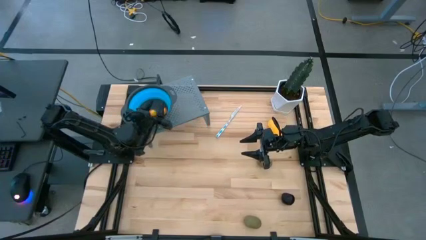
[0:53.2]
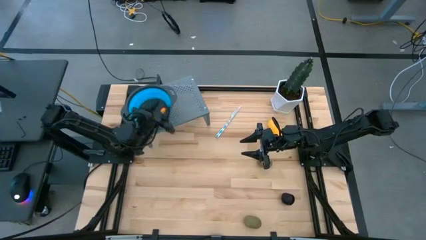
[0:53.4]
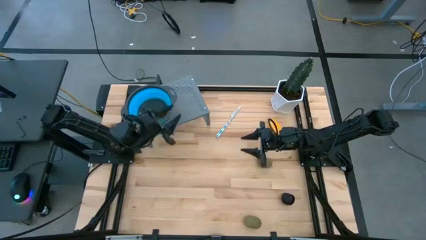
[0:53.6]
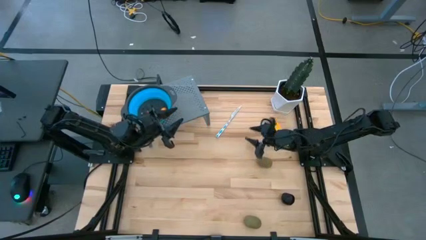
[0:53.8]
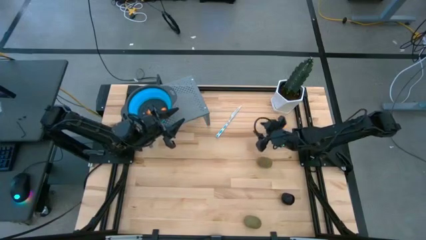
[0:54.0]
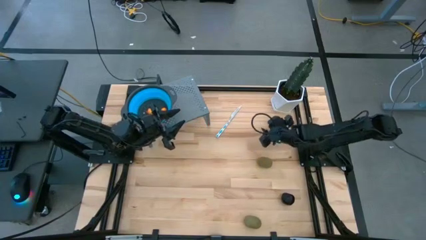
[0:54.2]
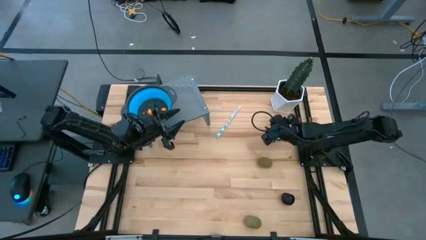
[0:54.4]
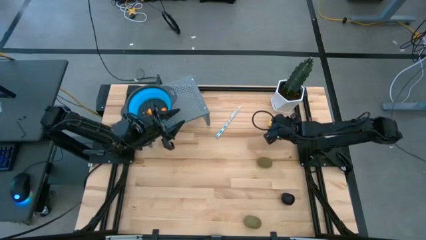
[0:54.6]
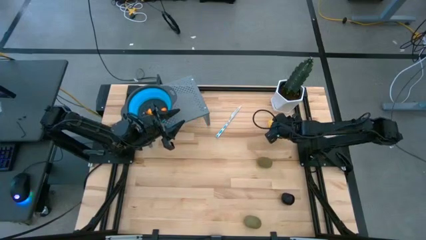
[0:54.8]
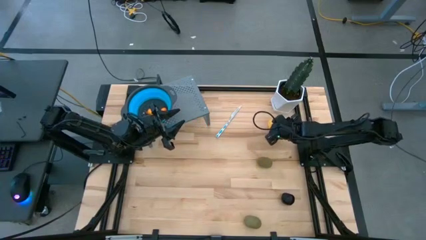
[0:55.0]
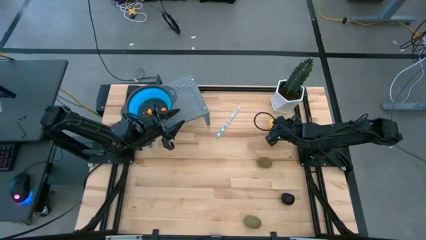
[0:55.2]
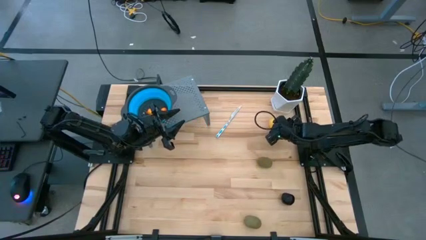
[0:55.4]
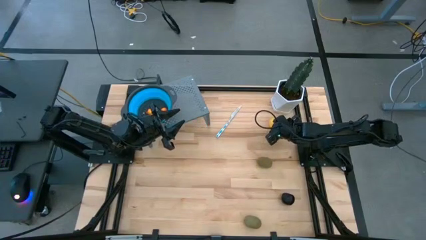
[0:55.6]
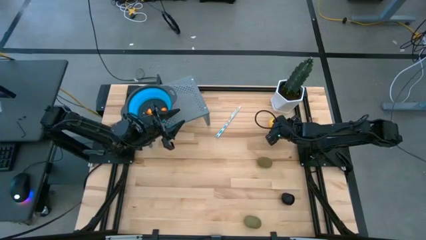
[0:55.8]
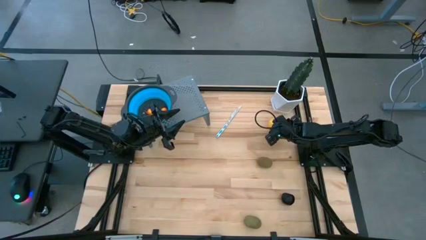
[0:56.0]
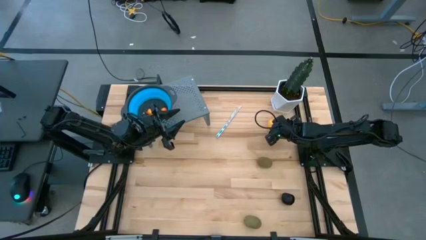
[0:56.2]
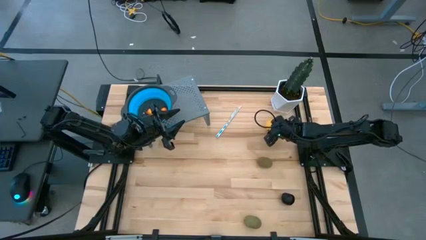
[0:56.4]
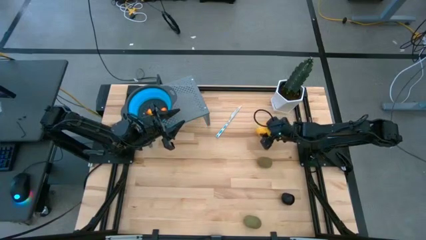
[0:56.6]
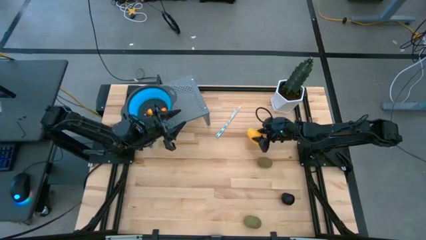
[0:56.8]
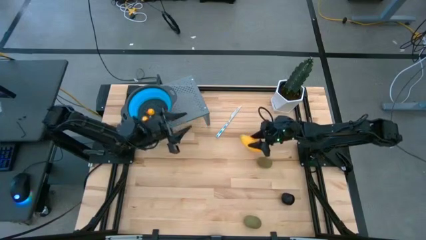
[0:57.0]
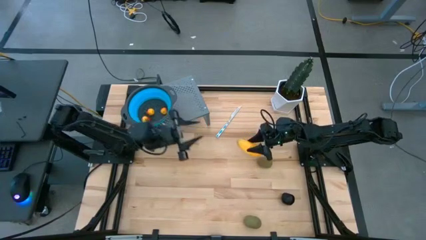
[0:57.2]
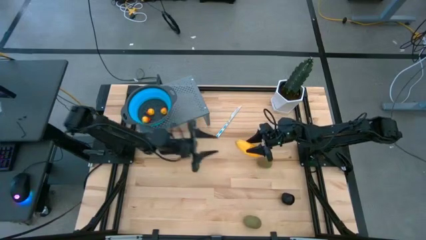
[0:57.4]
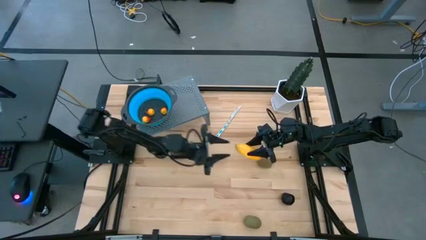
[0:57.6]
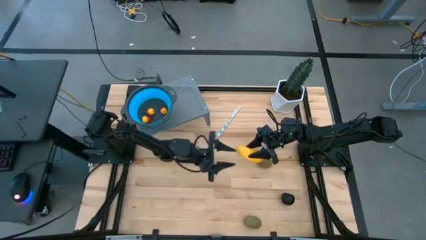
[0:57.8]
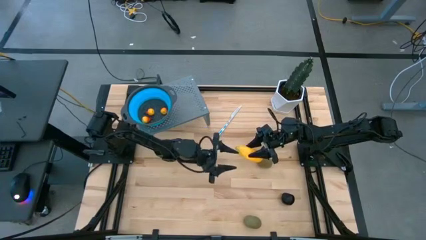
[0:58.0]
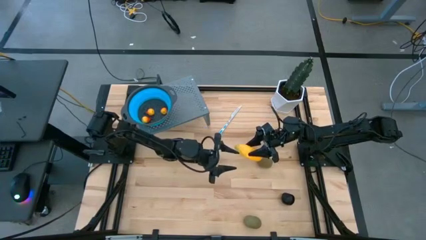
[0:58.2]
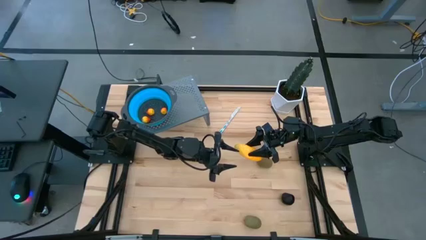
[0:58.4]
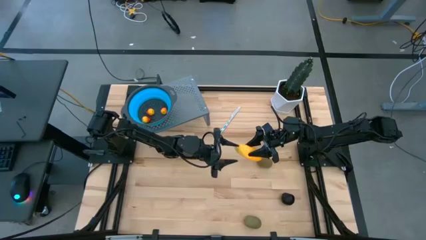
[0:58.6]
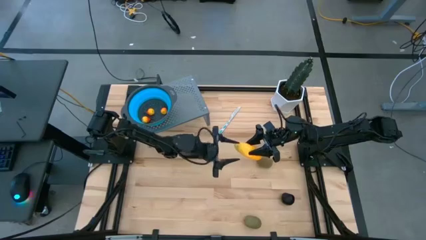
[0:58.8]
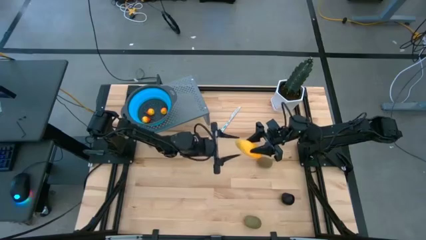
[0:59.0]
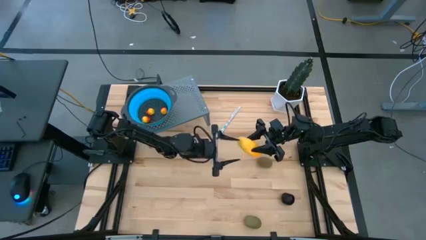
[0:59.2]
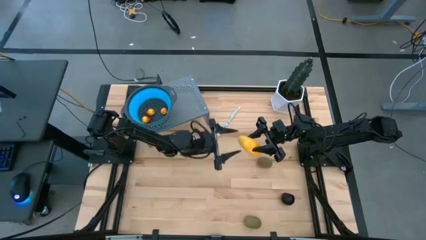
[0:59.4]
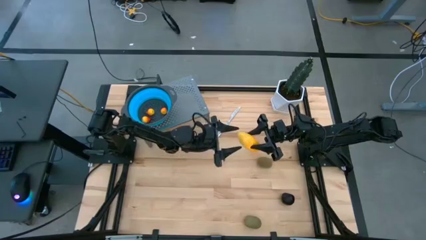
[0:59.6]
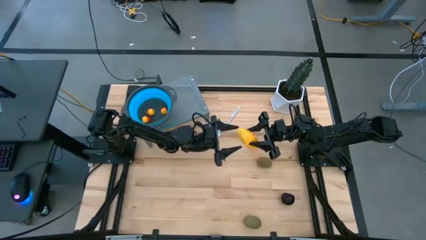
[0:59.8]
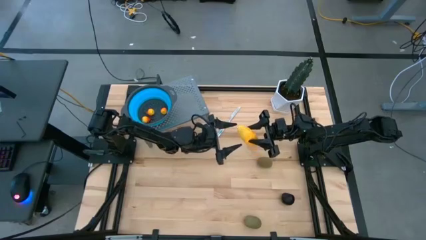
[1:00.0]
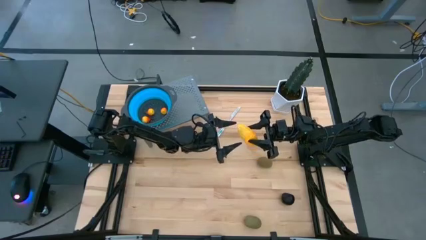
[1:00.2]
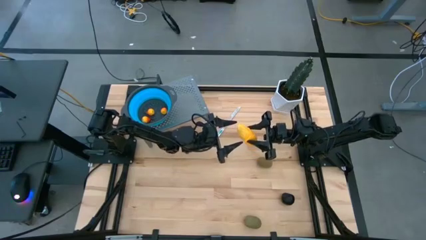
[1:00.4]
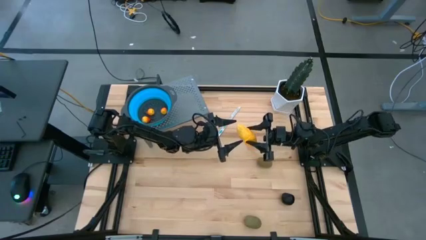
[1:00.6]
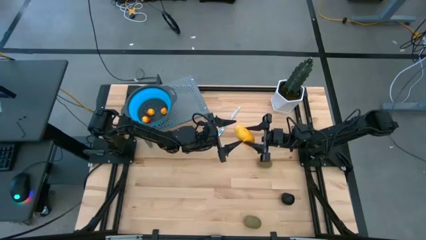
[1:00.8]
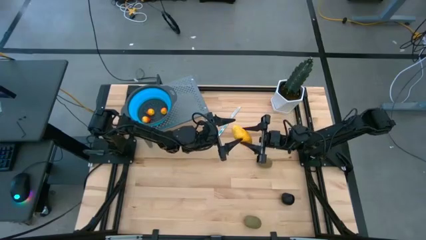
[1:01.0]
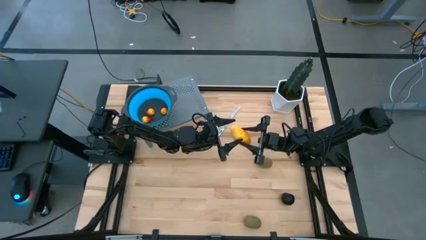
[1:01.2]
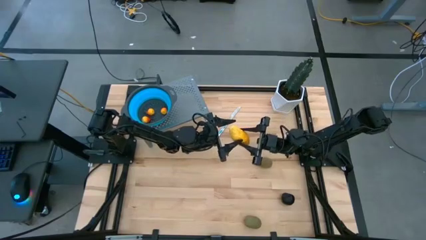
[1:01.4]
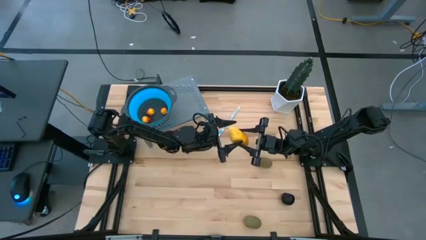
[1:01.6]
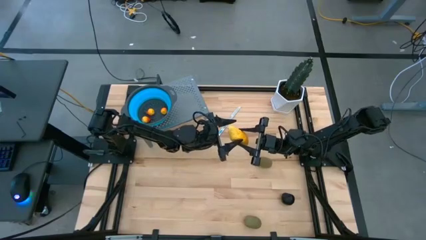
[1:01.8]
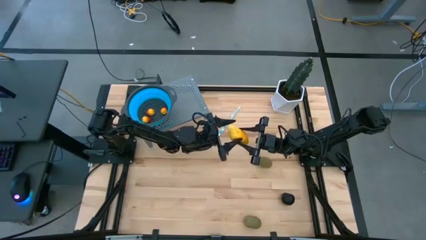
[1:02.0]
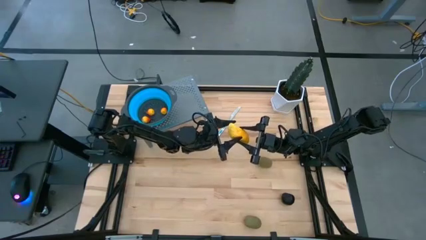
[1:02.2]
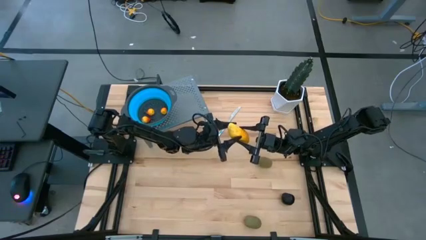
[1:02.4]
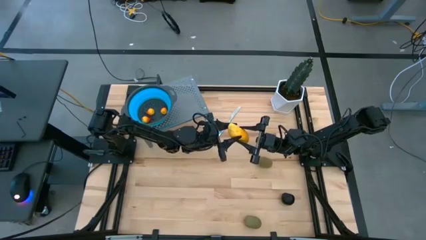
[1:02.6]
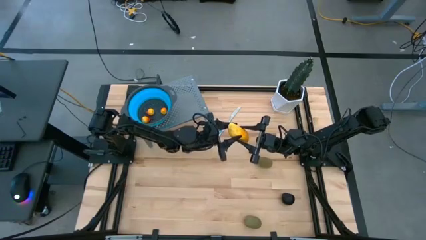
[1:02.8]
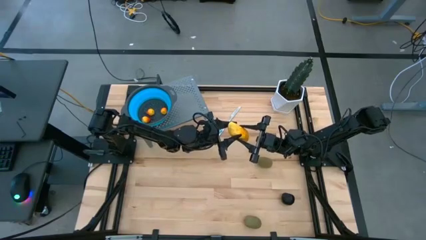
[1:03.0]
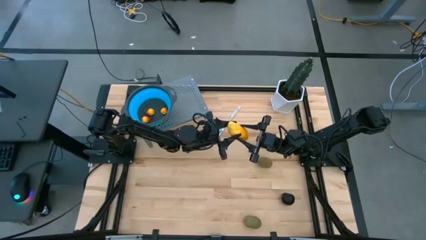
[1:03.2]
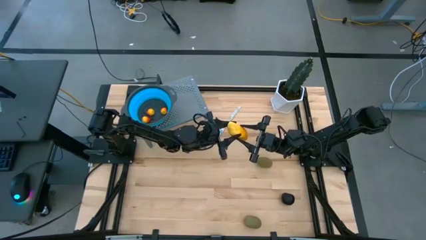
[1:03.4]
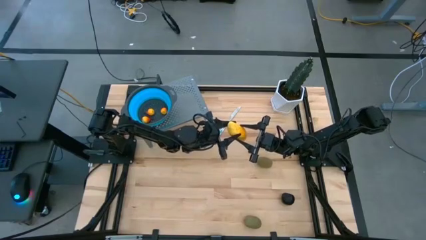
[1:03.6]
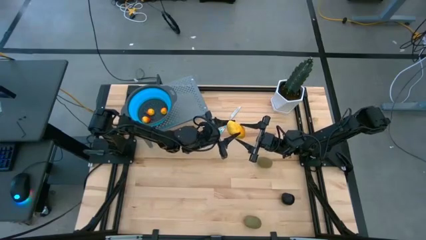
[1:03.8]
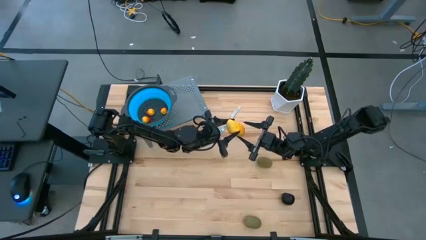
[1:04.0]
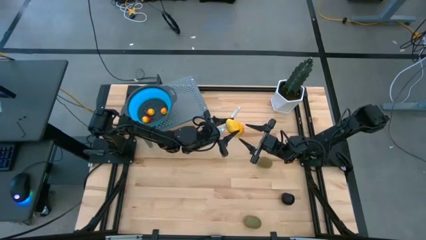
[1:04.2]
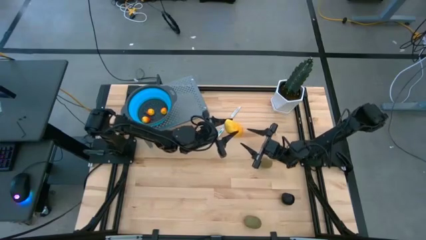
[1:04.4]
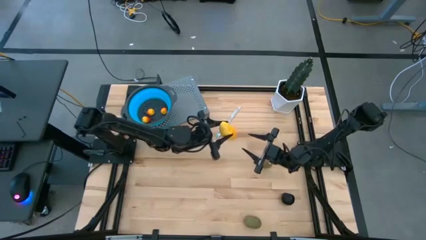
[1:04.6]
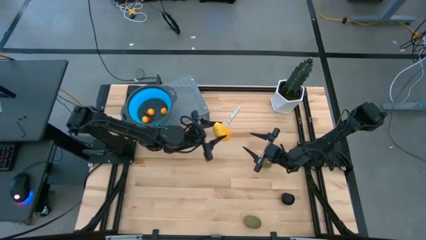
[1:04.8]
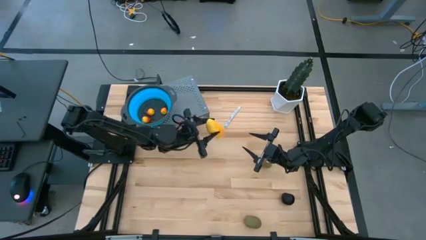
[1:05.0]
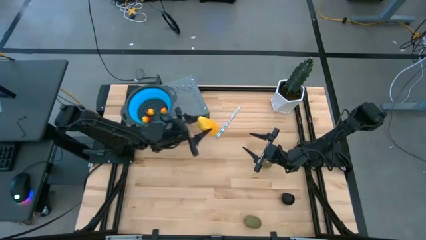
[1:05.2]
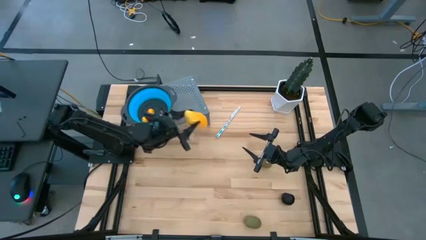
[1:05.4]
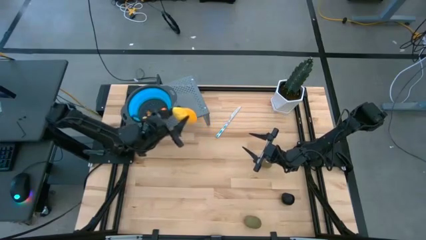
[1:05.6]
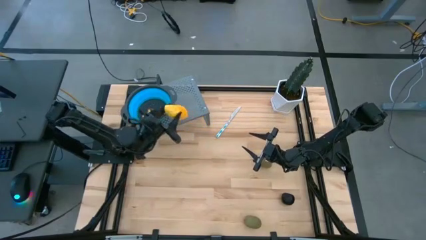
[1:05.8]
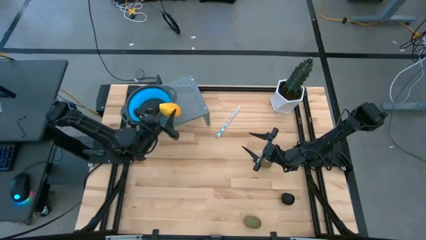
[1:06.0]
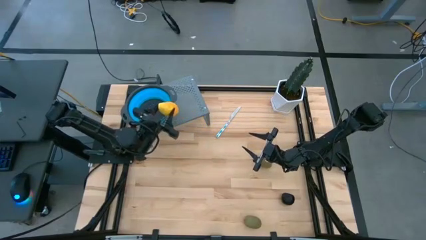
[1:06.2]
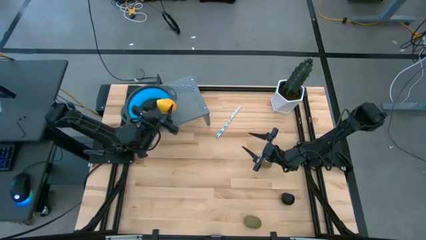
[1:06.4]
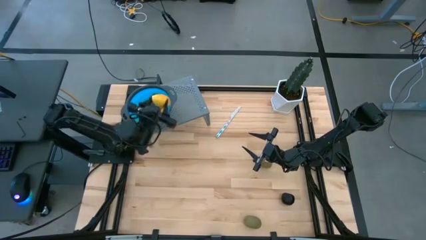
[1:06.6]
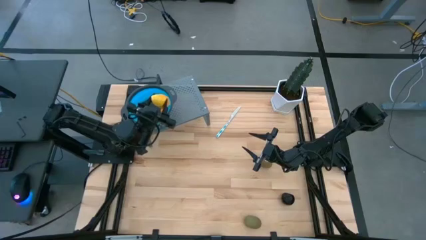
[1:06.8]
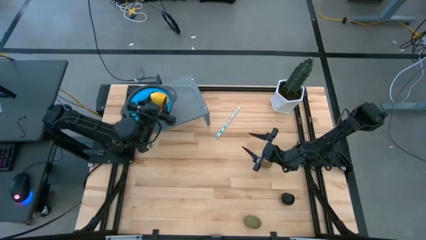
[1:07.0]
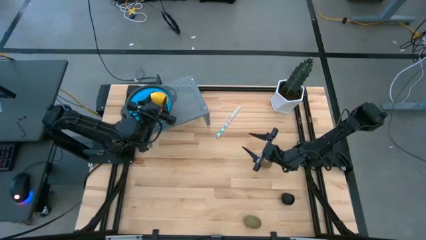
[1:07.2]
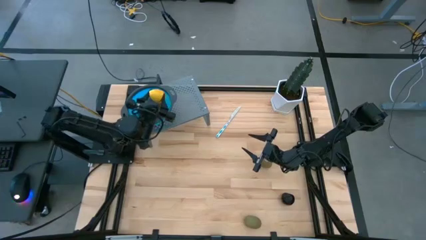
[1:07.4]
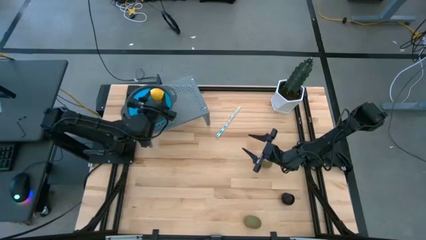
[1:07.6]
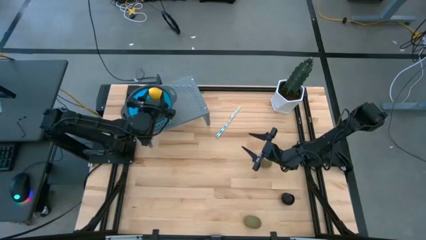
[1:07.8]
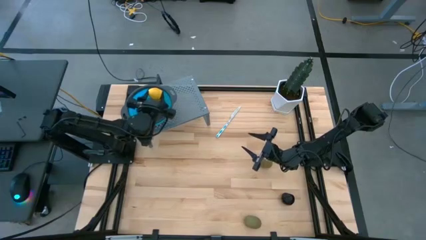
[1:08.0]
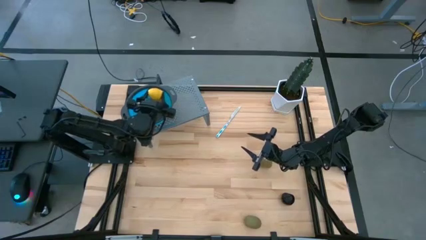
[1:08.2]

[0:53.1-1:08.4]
Task: Pick & Place Fruit
Put the yellow mango into the blue strainer bowl

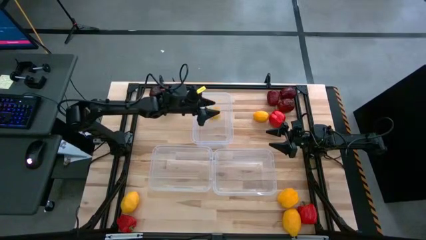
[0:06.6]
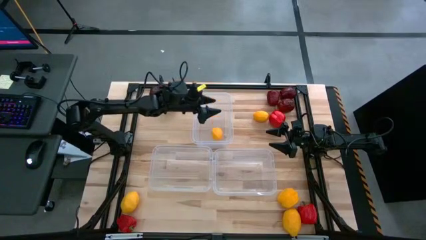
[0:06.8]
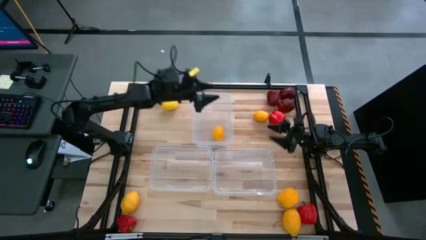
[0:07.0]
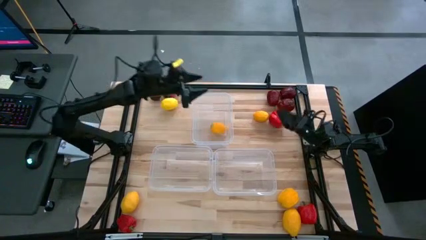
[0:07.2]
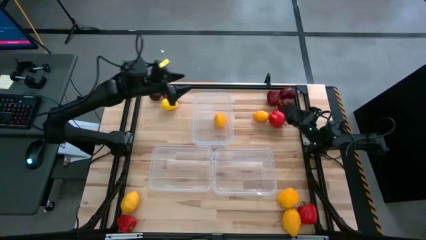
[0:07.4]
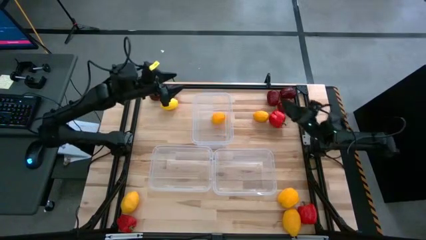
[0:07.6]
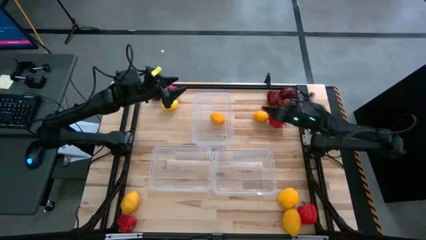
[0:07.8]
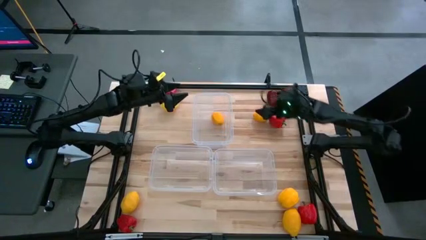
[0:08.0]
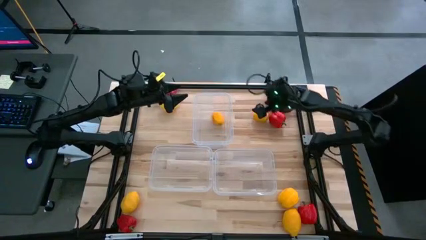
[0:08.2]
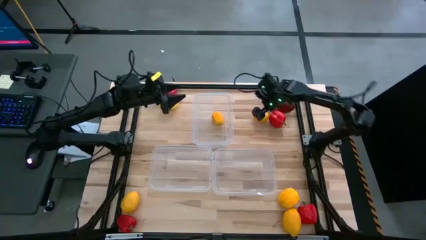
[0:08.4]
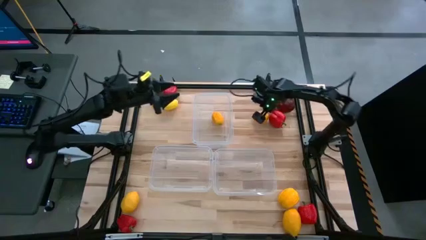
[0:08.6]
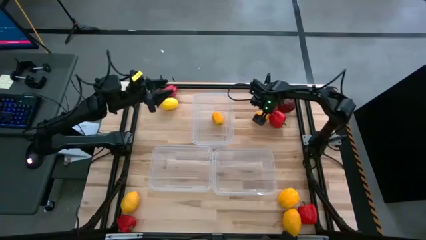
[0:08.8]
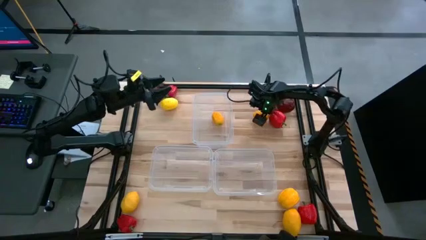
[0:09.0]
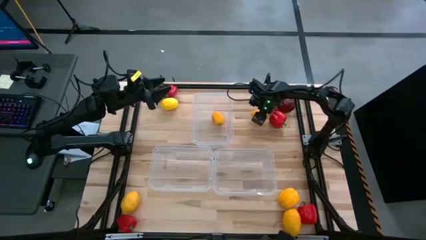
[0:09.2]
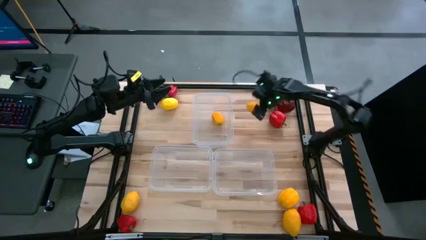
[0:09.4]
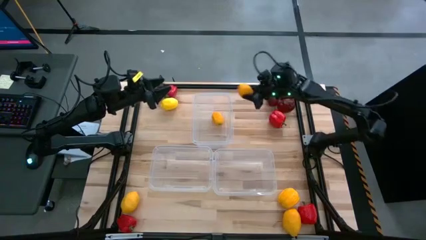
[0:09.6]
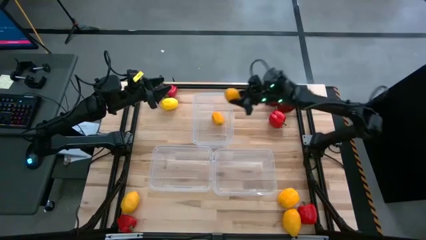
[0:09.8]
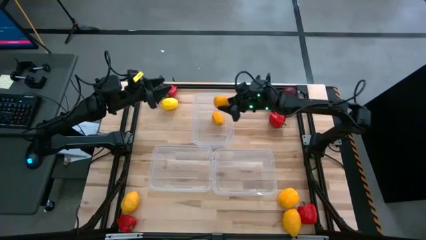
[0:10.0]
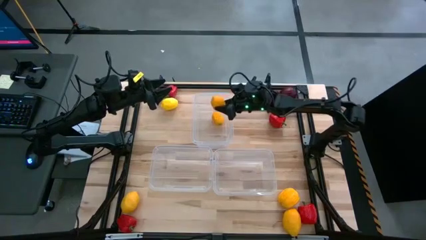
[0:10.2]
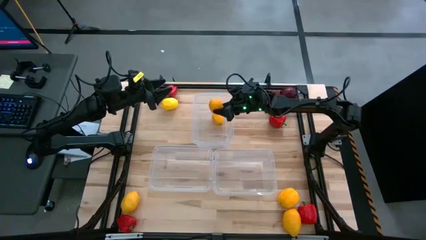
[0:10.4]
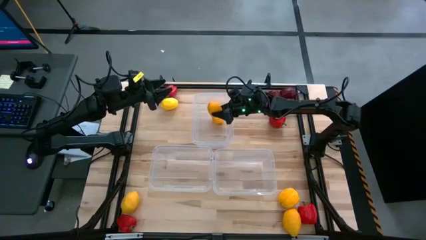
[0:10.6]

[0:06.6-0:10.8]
Task: Sort produce into baskets
Put the yellow lemon into the top center transparent bin
